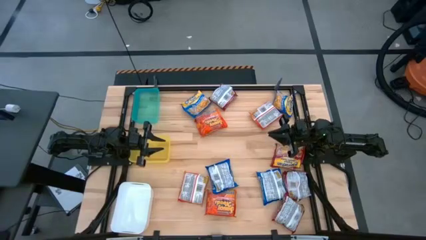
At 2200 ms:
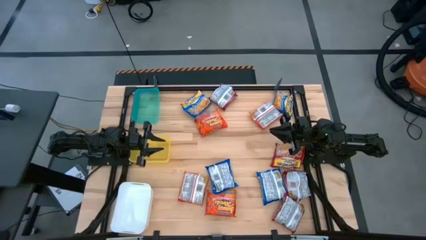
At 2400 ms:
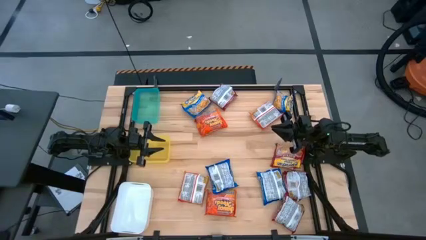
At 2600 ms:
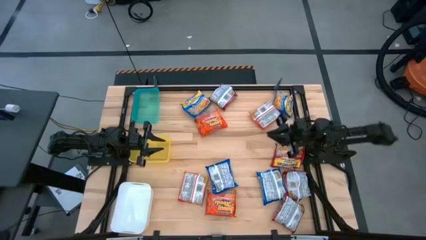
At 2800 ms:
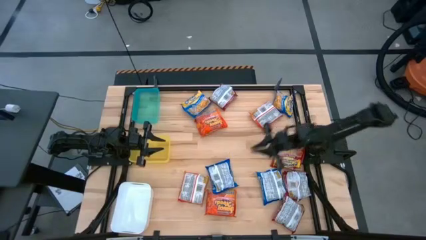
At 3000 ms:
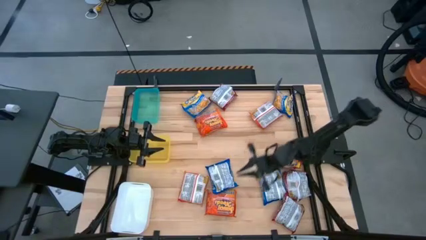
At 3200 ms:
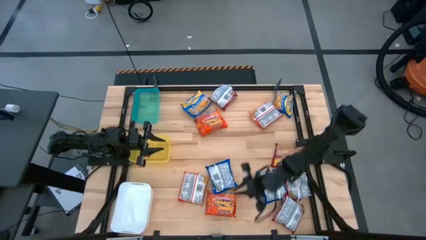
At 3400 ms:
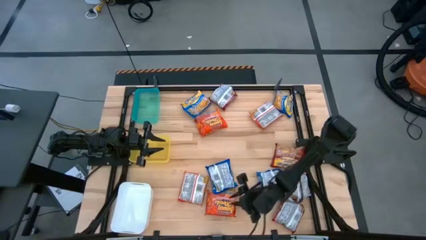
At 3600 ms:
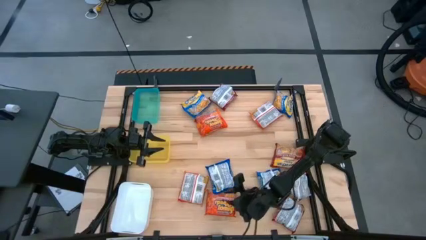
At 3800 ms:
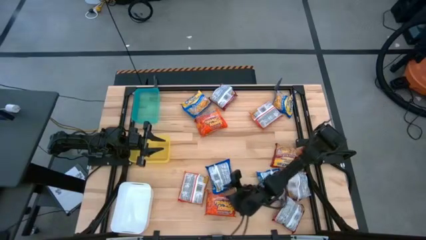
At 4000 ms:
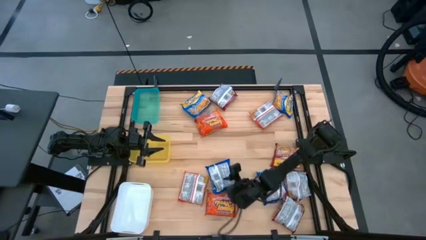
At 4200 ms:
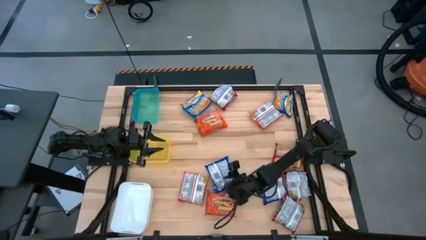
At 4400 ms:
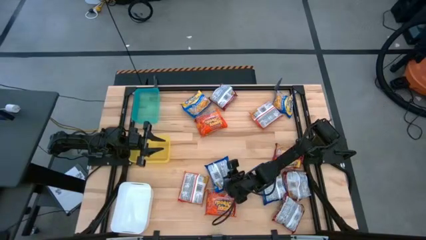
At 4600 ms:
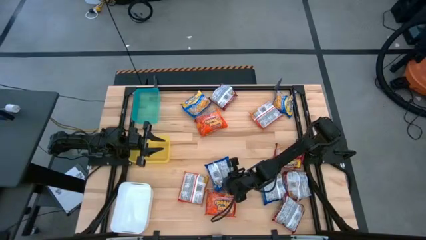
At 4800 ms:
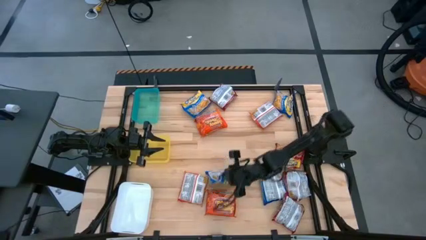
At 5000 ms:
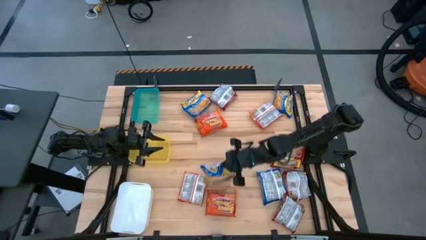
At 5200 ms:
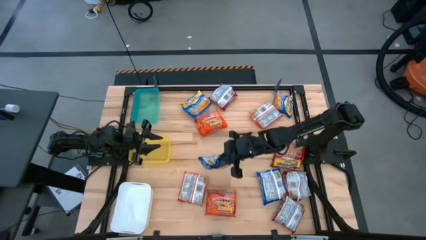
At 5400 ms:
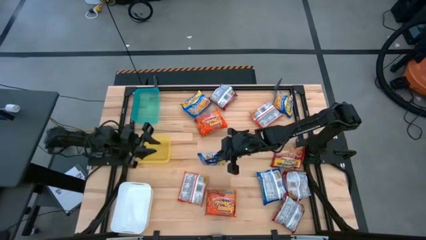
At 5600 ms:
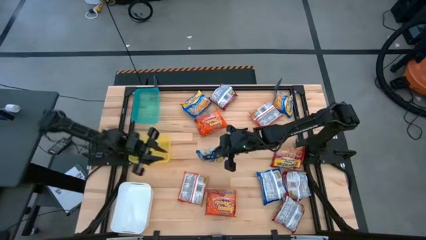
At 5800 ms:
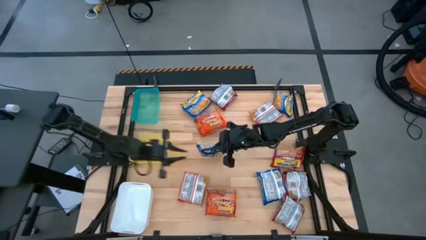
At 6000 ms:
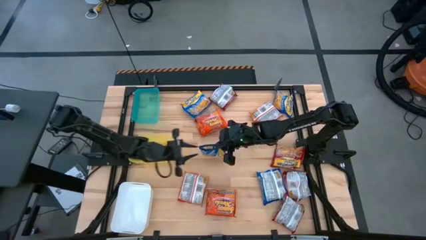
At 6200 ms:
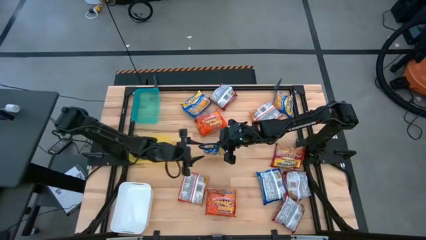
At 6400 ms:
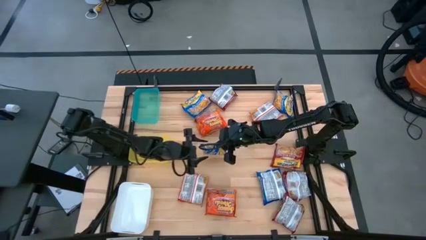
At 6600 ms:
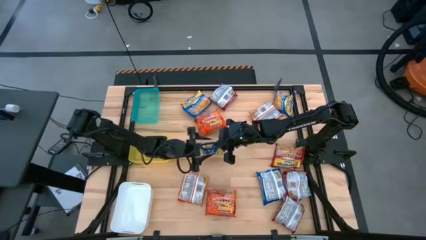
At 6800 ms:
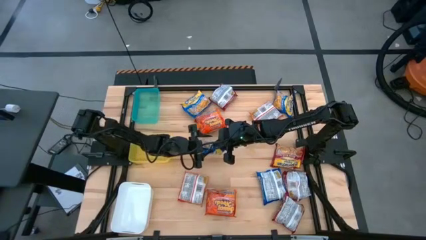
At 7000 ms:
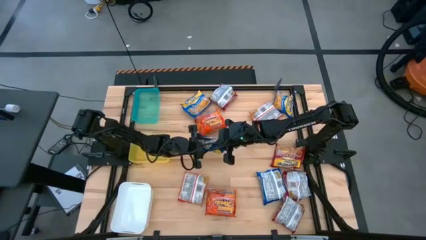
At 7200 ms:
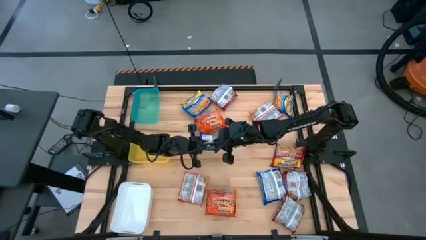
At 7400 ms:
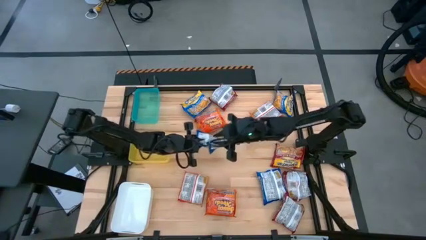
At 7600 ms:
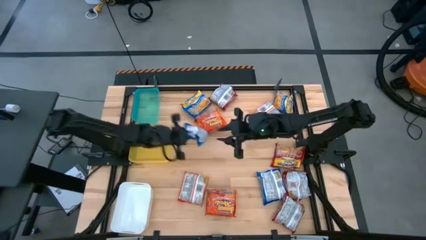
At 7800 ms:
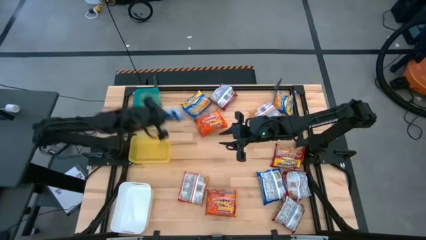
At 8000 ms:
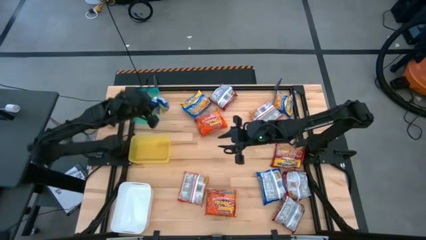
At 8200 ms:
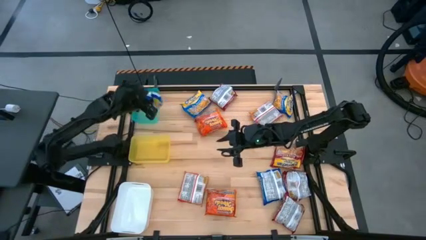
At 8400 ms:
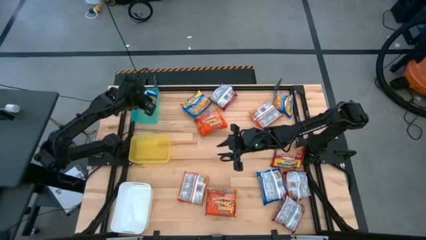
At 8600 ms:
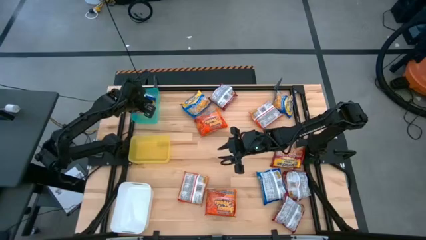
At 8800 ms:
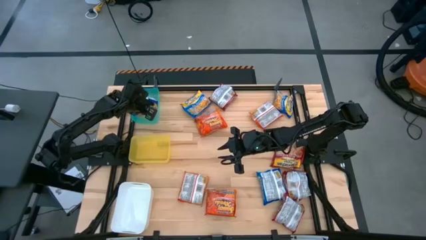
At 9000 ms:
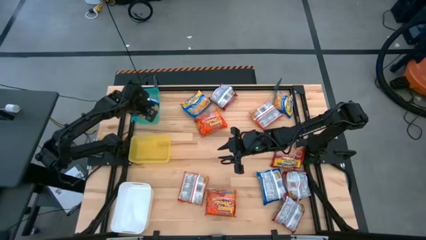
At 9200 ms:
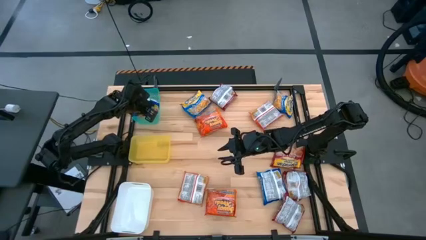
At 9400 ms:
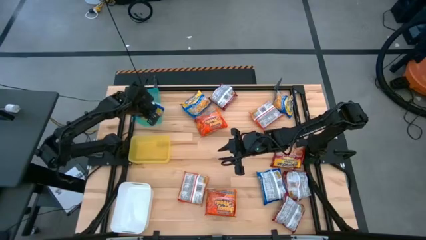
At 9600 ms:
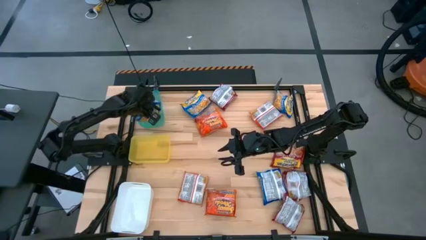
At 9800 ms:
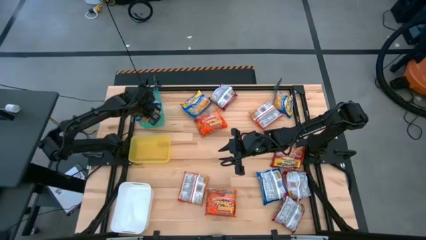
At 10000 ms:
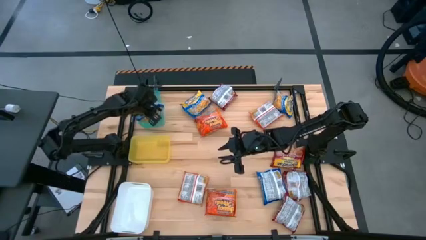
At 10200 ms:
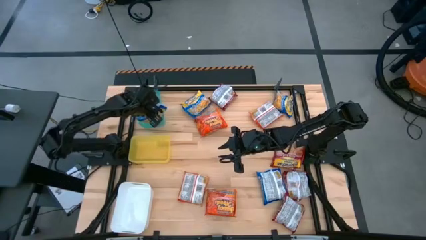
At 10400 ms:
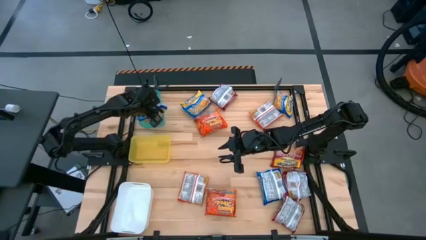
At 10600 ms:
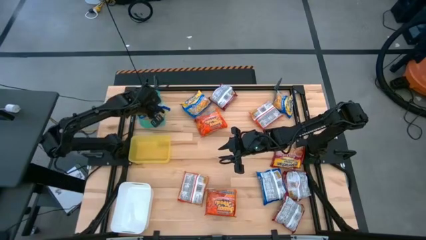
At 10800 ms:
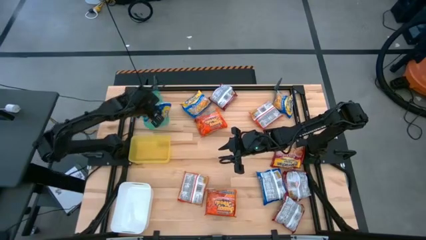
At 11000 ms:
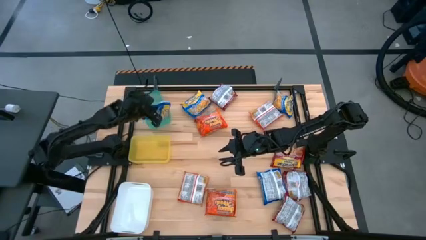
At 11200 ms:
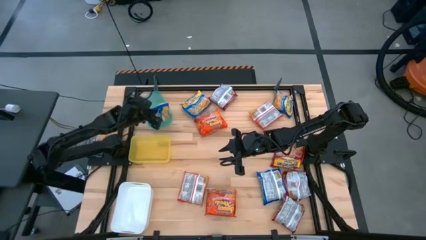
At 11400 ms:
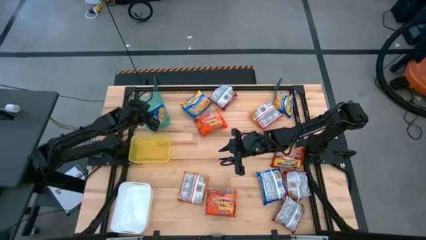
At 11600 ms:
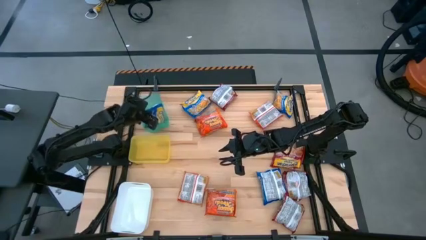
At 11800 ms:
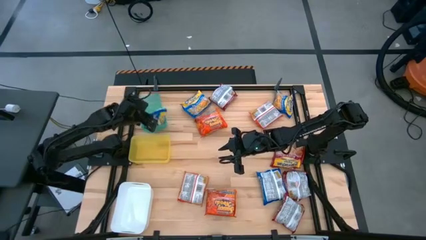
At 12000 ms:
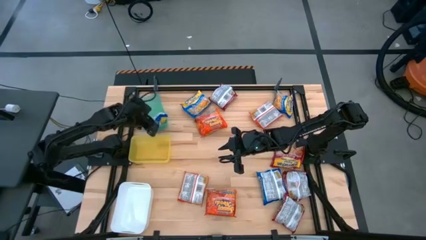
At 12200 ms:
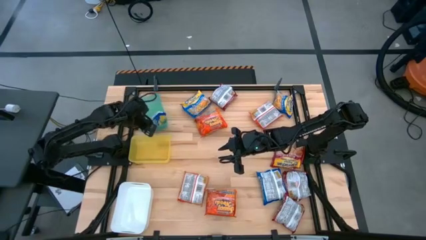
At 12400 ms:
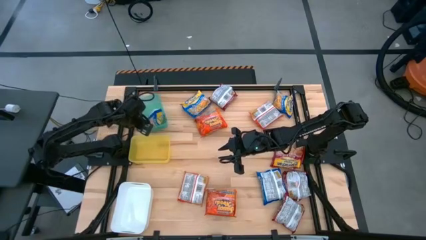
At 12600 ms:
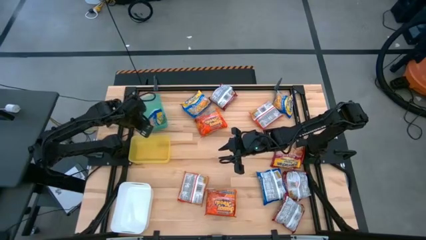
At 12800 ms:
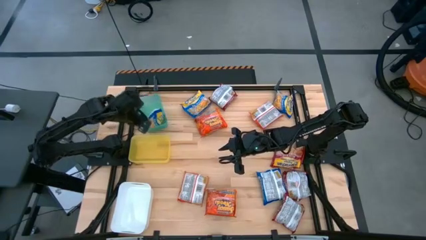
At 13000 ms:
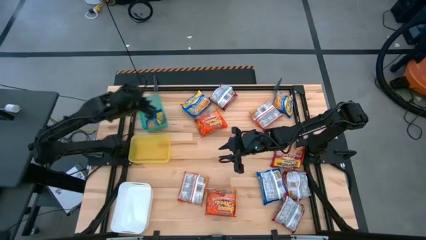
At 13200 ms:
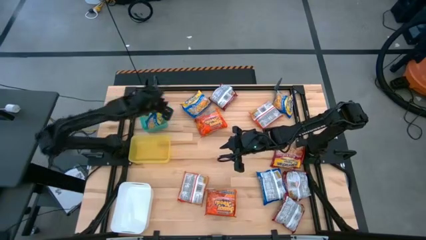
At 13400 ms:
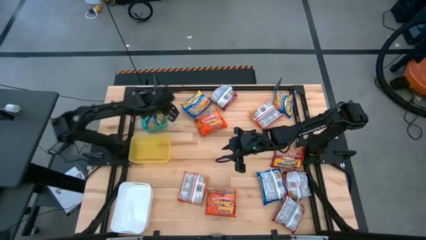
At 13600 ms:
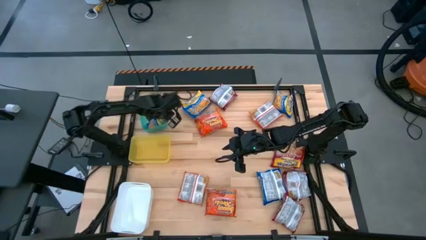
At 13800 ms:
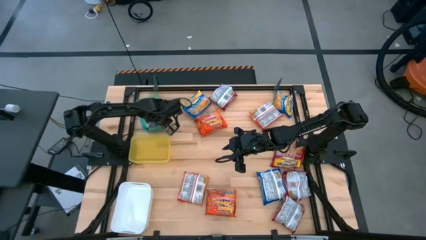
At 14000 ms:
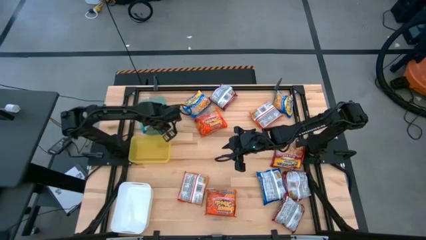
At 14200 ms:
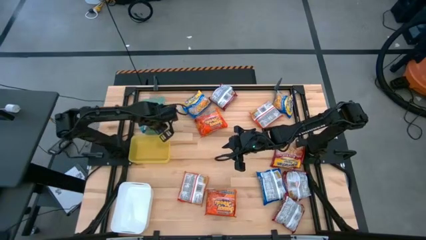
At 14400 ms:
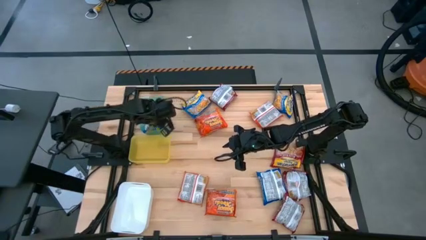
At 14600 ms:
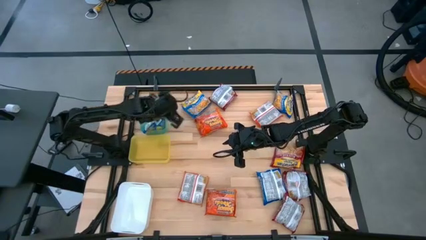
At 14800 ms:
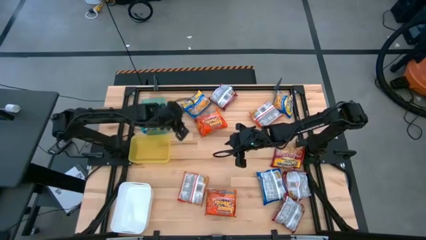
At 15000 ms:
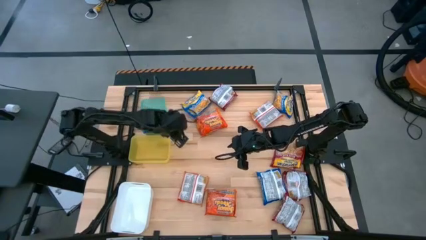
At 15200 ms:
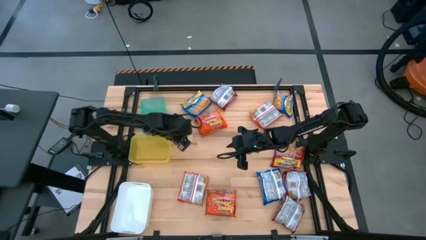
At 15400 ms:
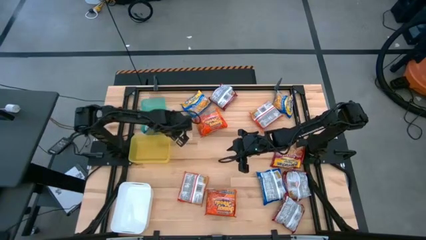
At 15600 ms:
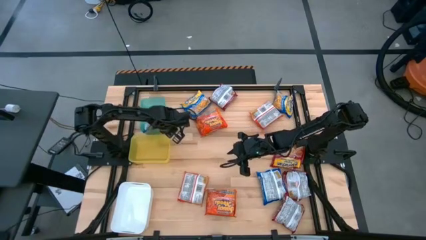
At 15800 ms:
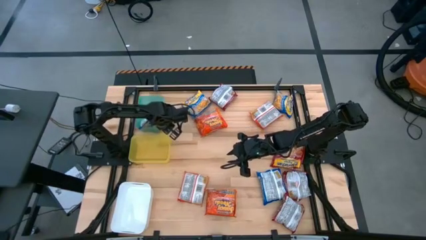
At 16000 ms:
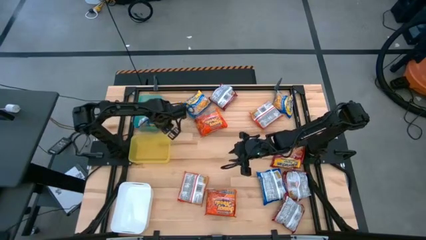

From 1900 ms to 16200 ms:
Task: Sort Maruchan noodles
Put the blue noodle pack into the green bin

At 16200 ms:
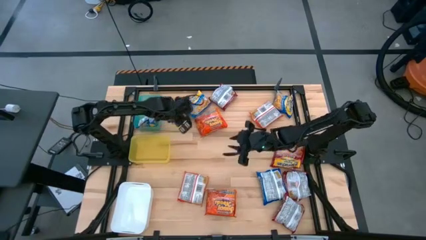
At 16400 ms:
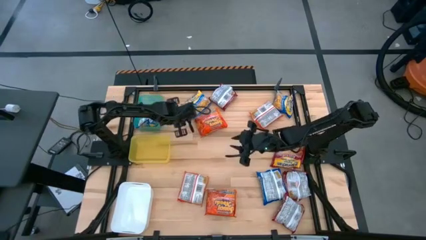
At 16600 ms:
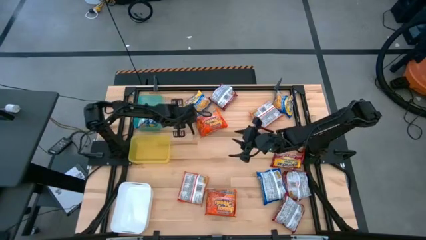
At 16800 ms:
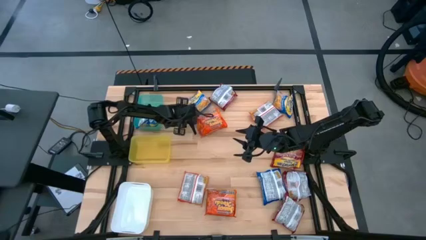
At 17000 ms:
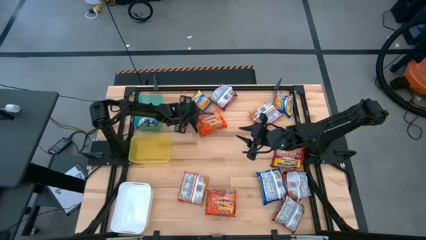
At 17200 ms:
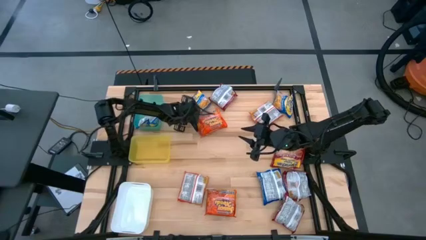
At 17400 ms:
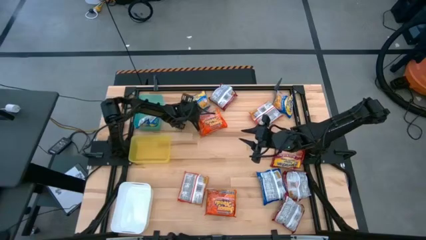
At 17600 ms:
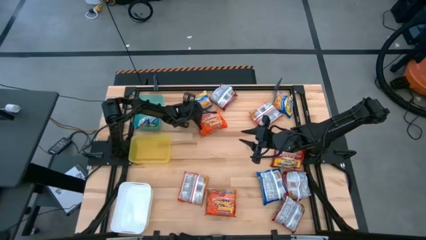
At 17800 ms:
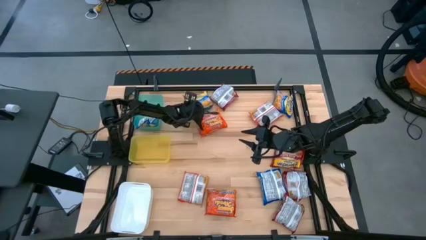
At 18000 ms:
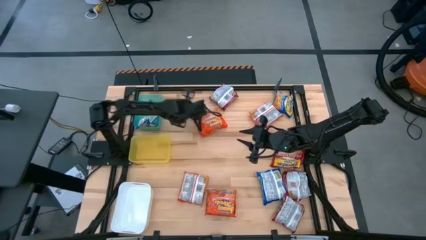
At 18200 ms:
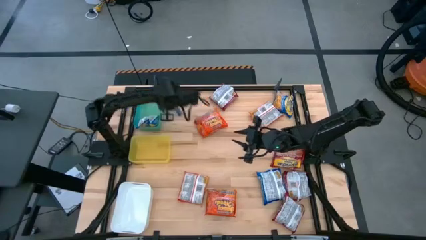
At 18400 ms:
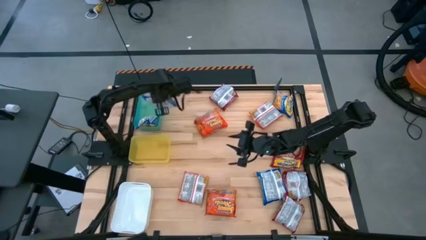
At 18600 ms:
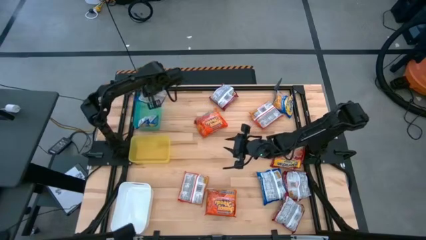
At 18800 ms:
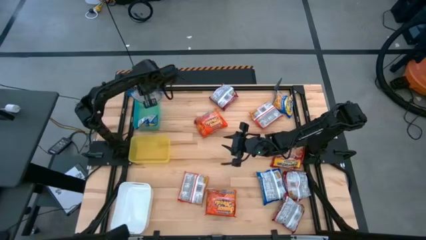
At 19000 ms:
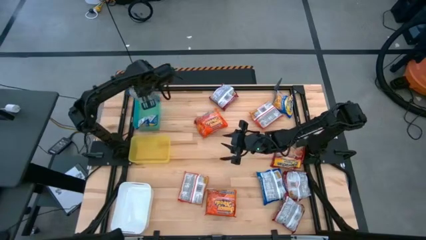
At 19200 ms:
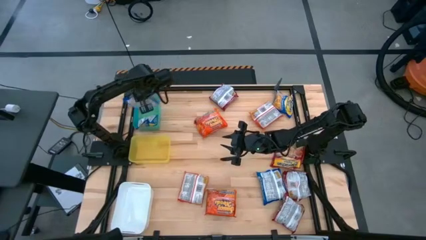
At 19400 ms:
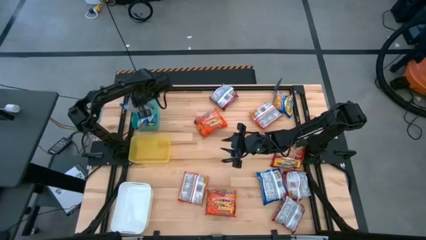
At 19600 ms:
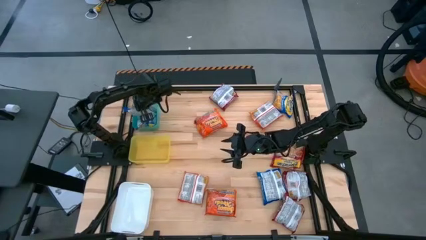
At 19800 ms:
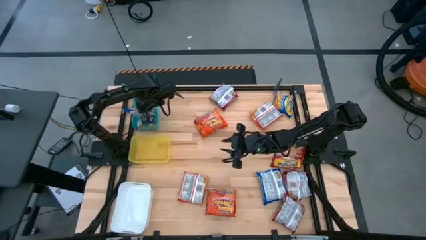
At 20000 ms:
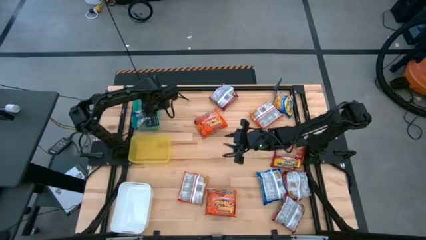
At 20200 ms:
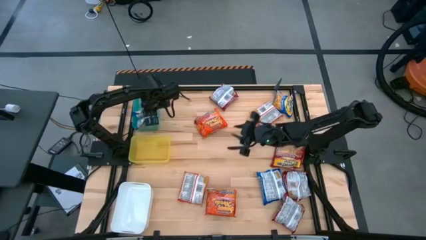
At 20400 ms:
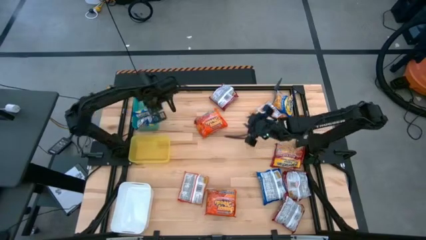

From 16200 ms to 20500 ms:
Put the blue noodle pack into the green bin
